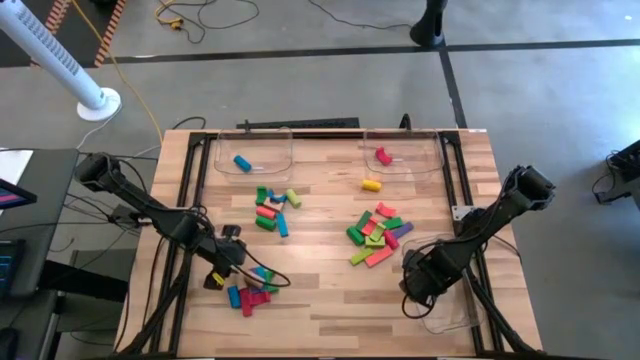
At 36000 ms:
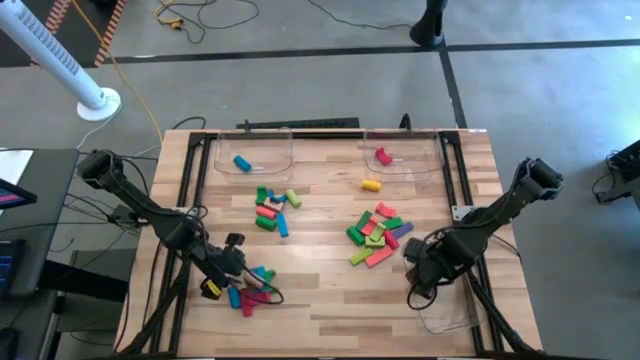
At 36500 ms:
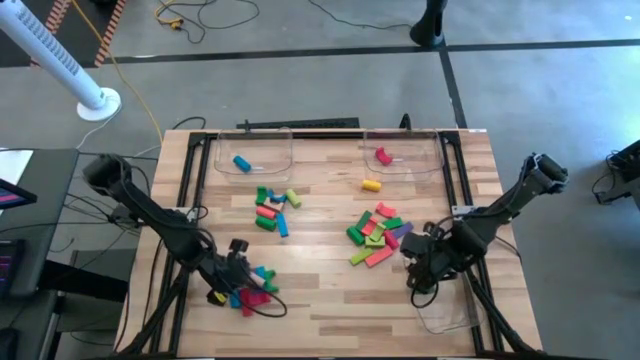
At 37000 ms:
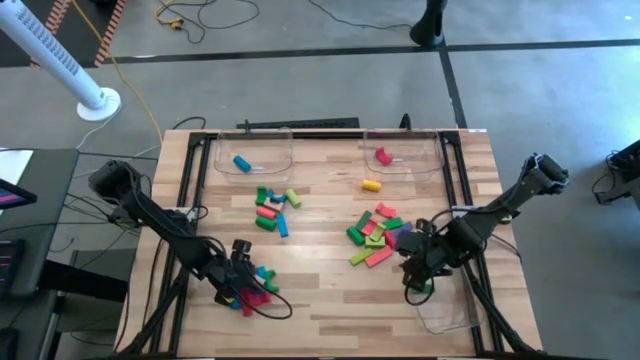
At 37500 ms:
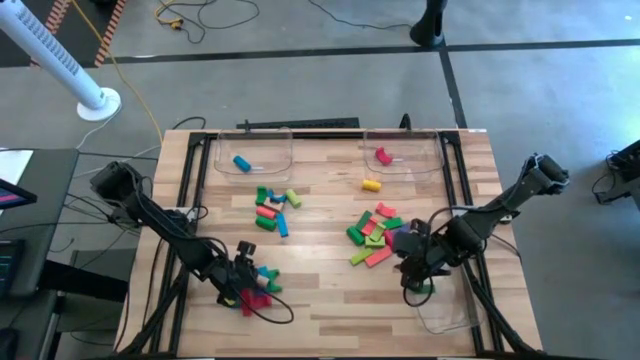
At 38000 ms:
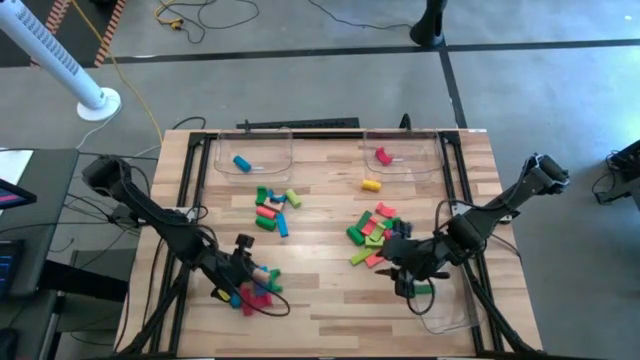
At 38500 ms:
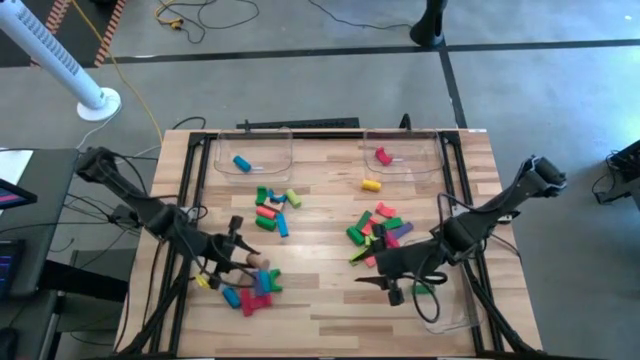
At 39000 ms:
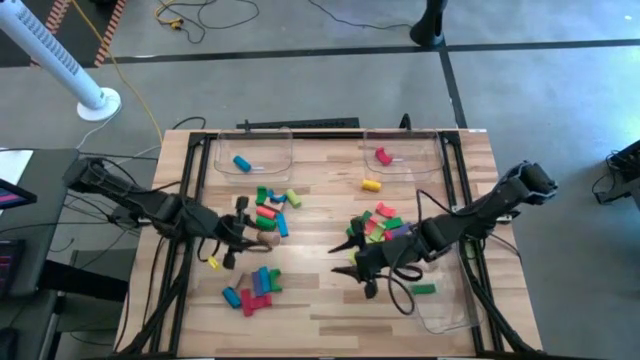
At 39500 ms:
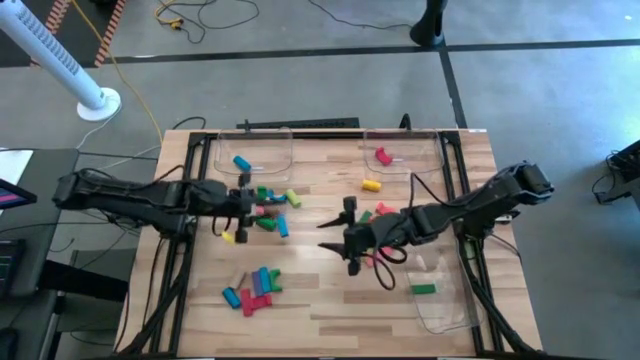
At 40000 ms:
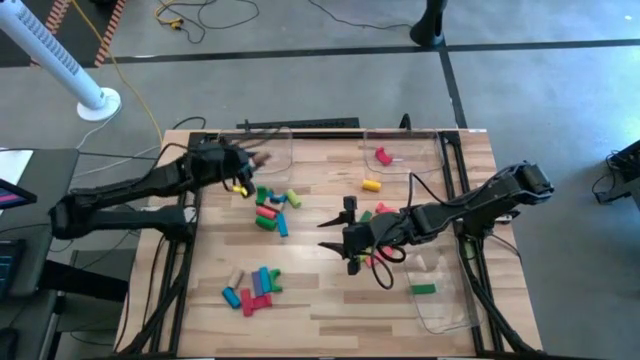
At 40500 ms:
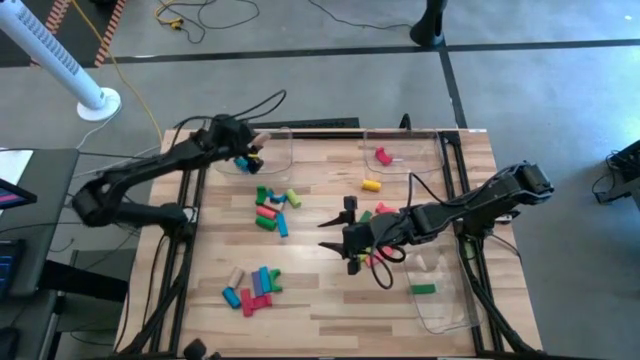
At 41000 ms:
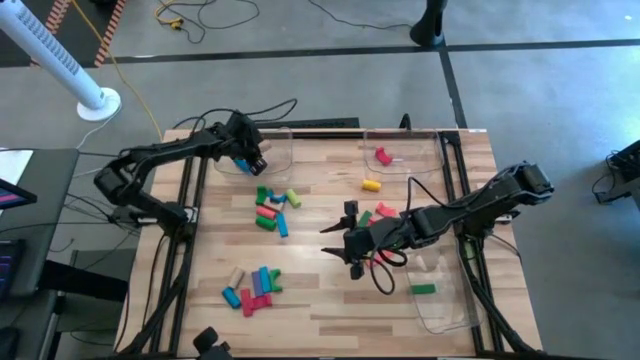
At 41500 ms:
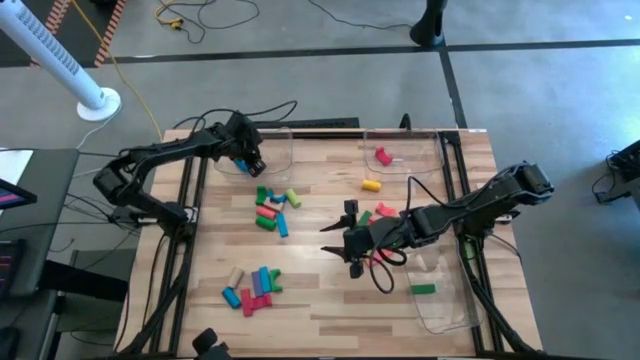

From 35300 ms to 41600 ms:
Task: Sort blocks by size
Put the brown cylindrical block into the top left transparent bin

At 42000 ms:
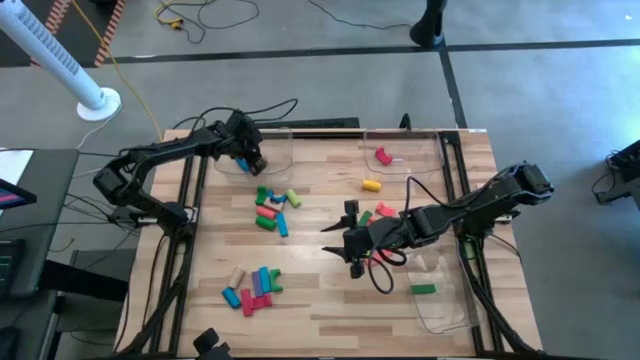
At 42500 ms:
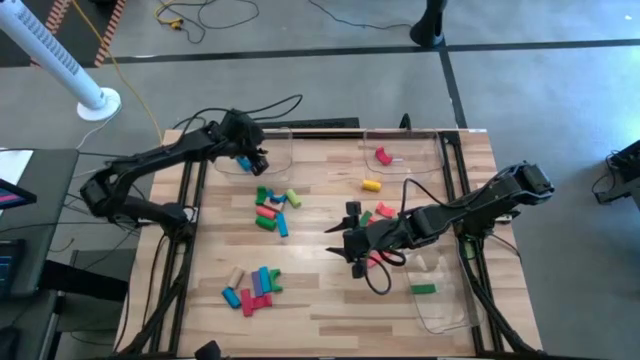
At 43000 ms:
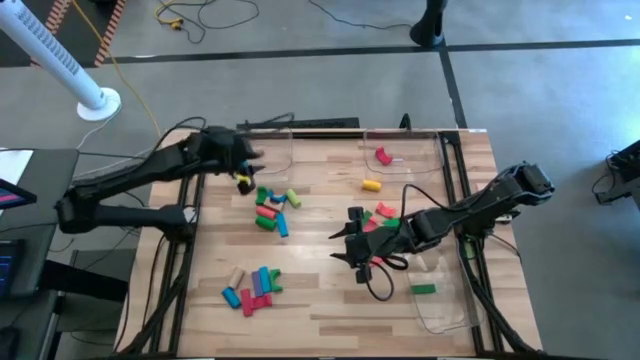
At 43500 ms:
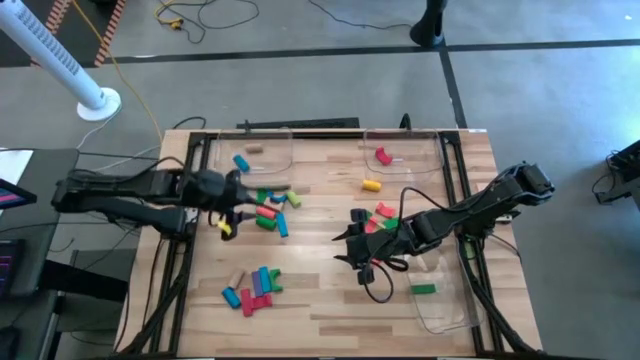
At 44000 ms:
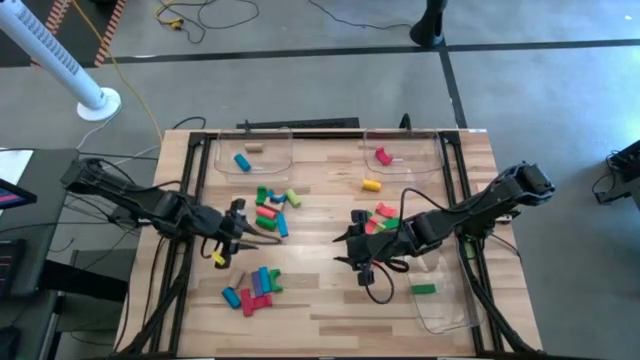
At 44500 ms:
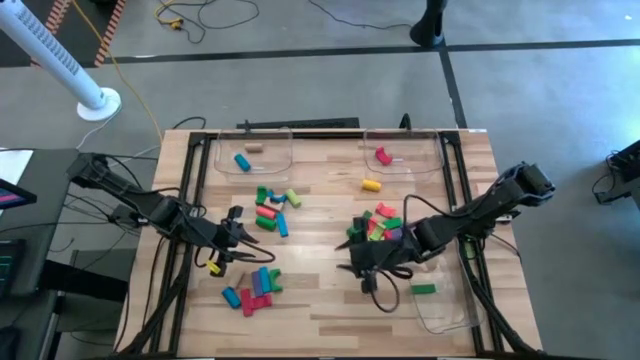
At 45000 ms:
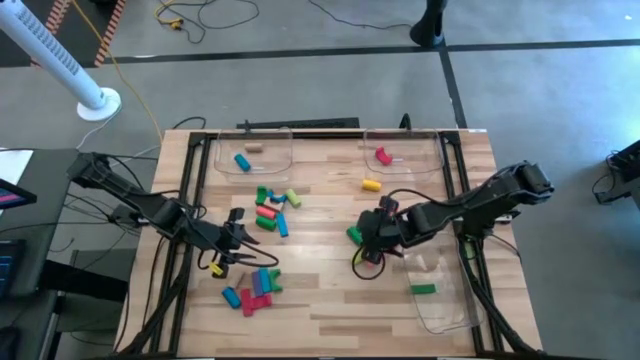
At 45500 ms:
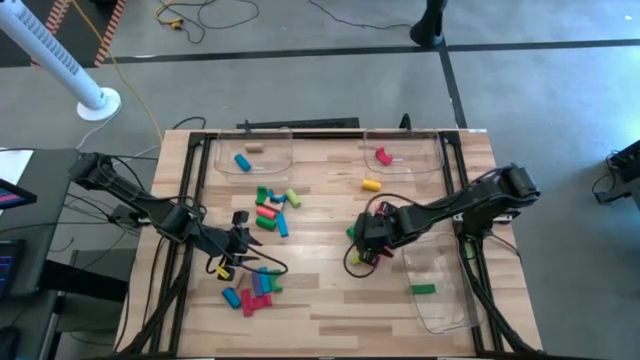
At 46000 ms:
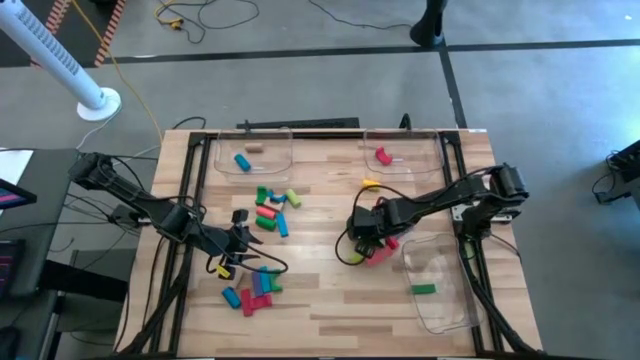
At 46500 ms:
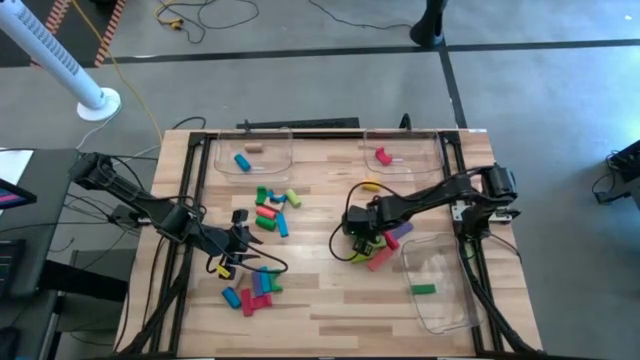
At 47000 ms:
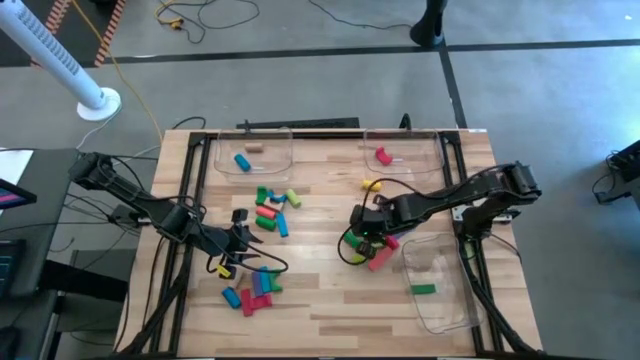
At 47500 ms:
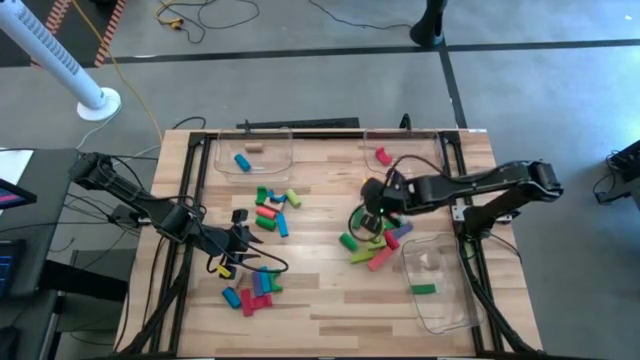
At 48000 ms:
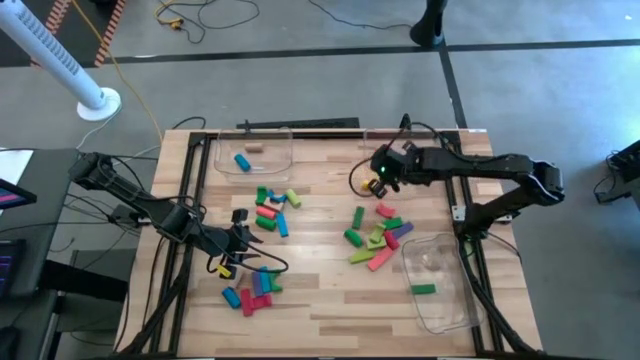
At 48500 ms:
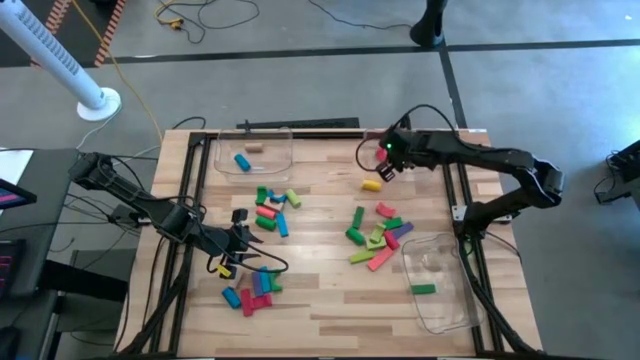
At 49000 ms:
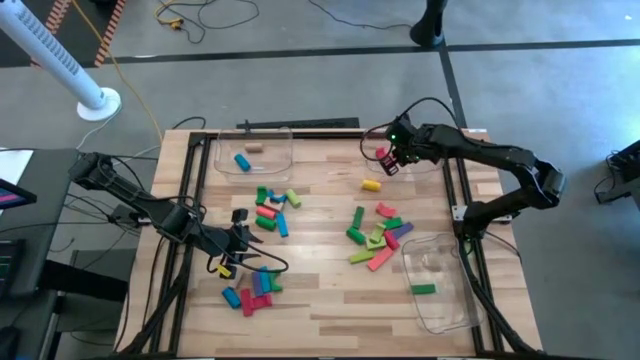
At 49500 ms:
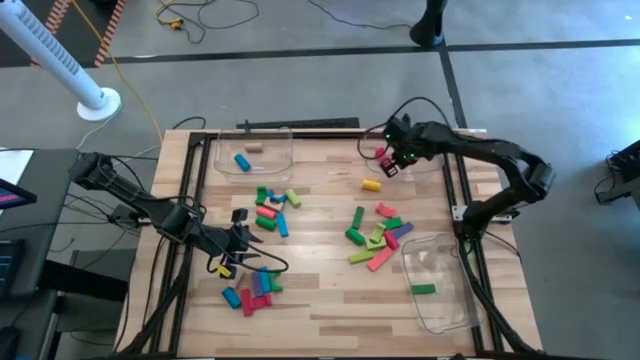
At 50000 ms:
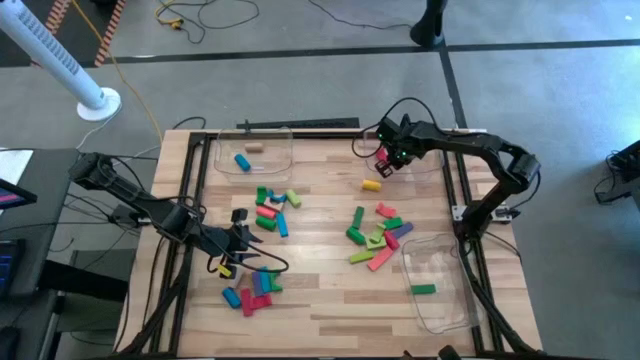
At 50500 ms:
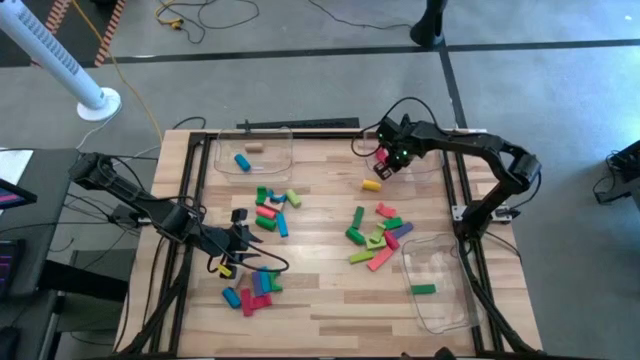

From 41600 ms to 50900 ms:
Put the orange arch block into the top right transparent bin

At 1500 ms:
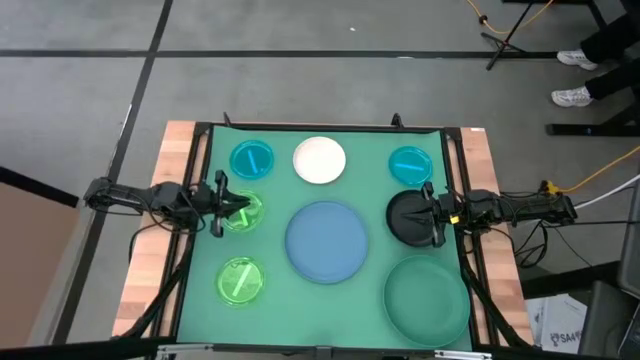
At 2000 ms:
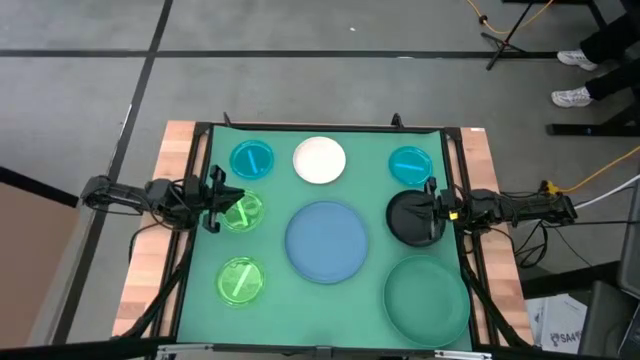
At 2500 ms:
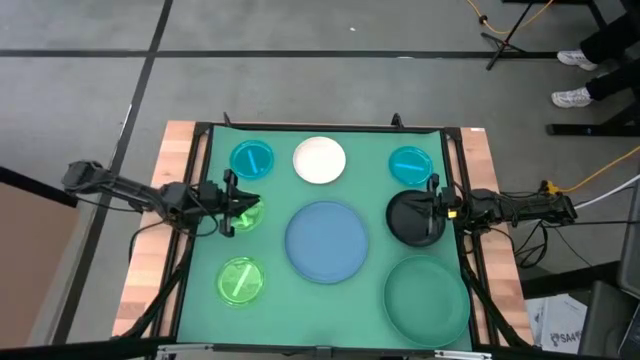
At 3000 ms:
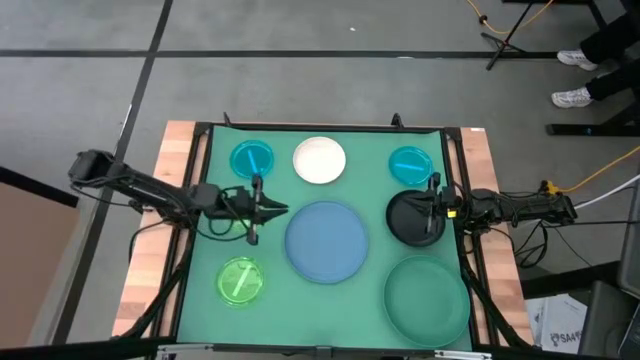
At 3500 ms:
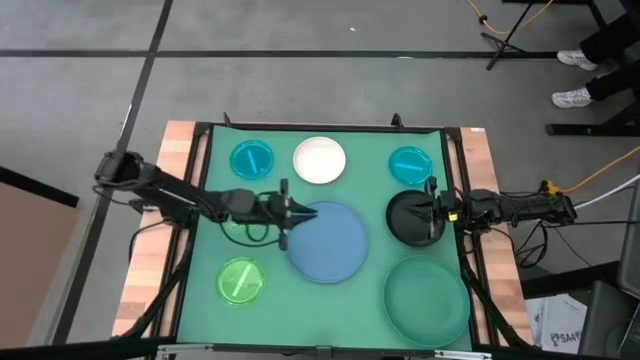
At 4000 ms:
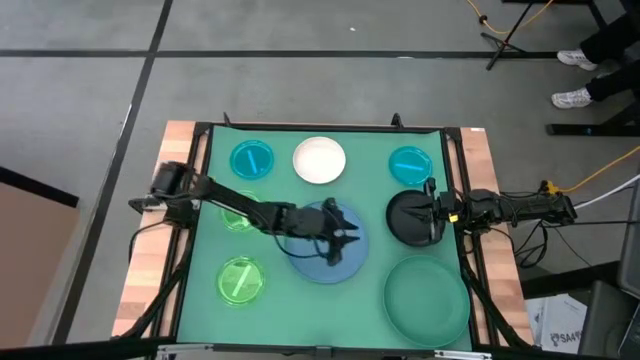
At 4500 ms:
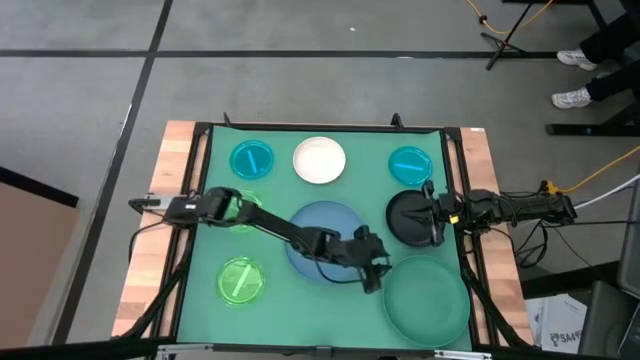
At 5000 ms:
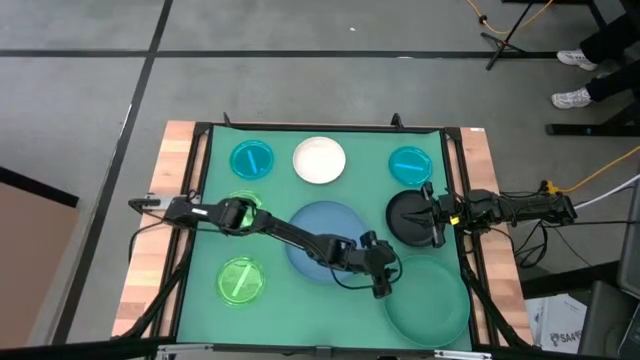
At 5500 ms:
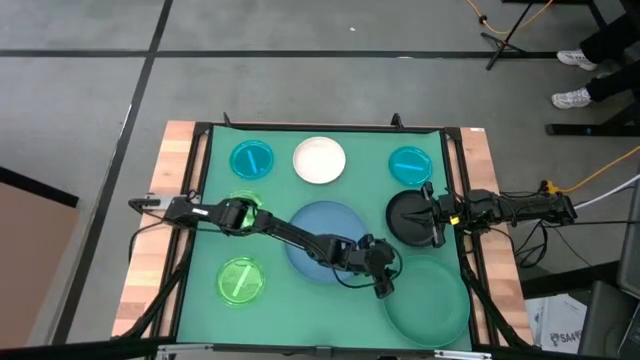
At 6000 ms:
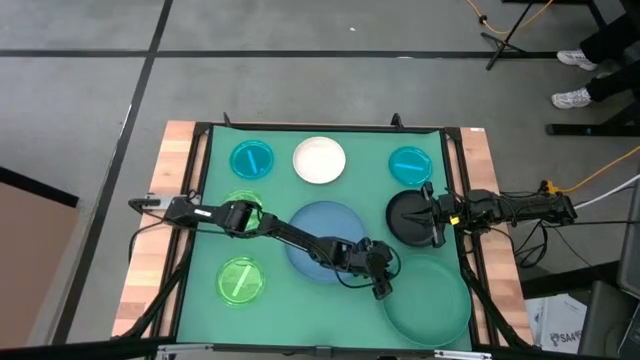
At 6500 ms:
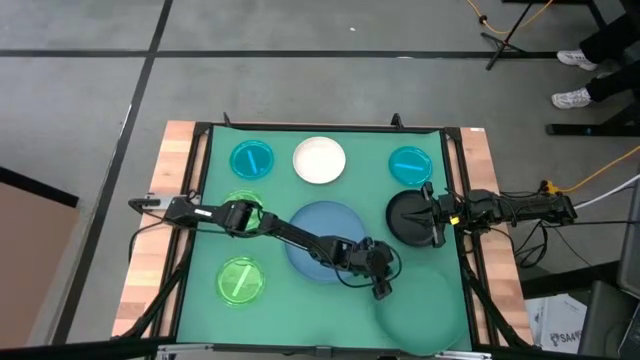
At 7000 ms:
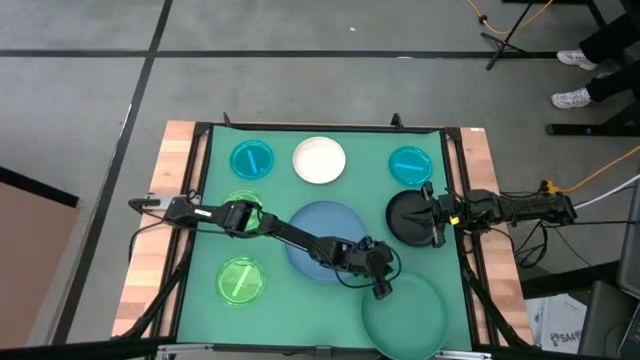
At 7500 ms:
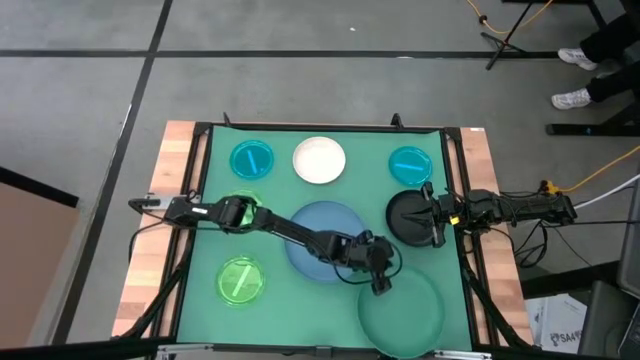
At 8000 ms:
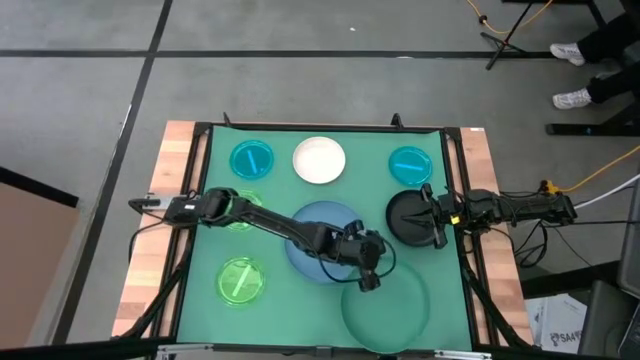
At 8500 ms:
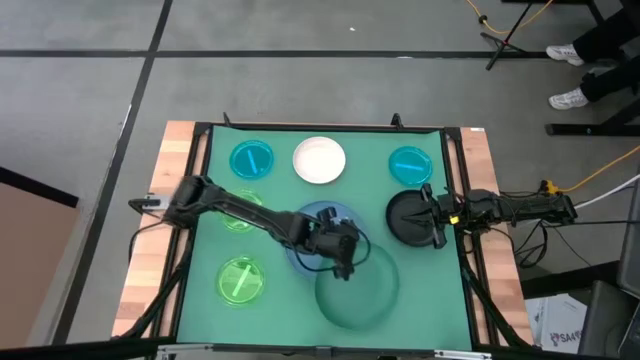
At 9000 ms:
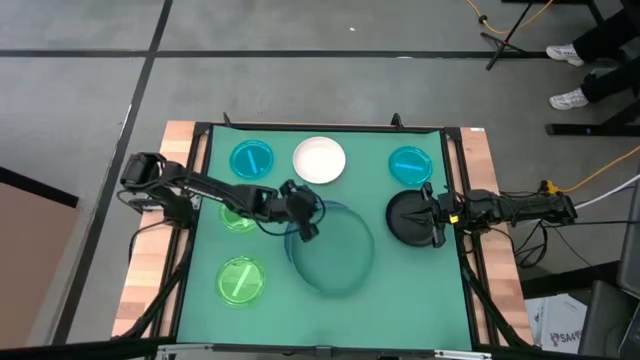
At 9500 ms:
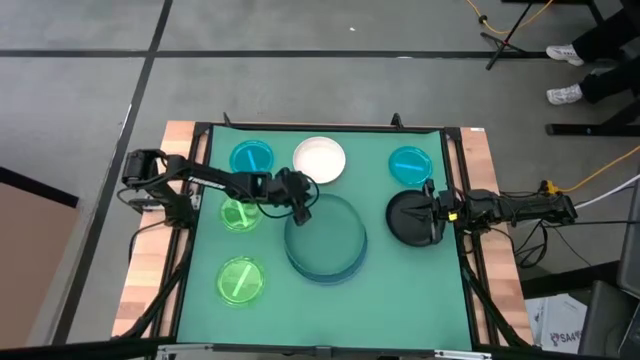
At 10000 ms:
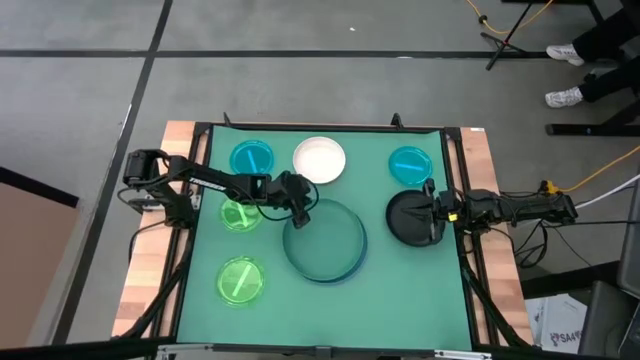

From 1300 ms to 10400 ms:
Task: Stack plastic plates
Stack the green plate on top of the blue plate
